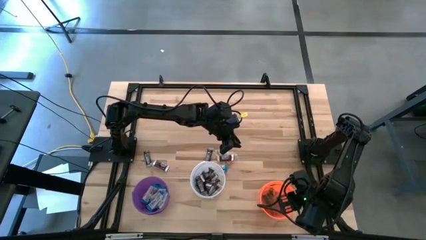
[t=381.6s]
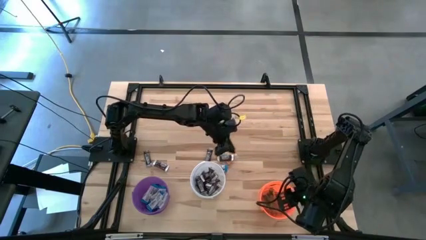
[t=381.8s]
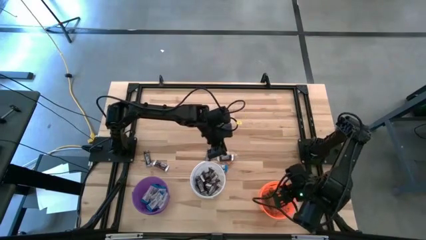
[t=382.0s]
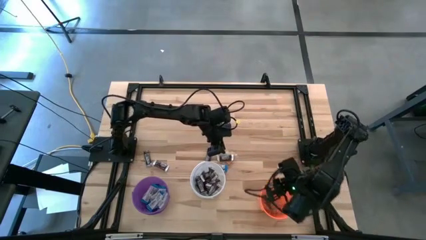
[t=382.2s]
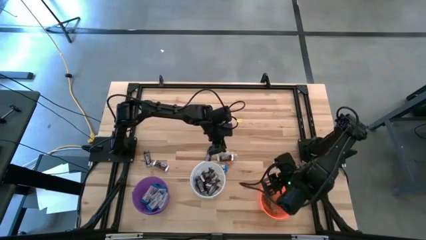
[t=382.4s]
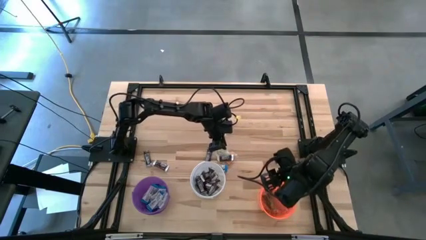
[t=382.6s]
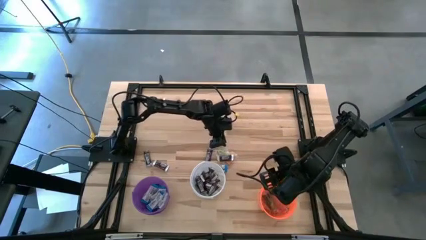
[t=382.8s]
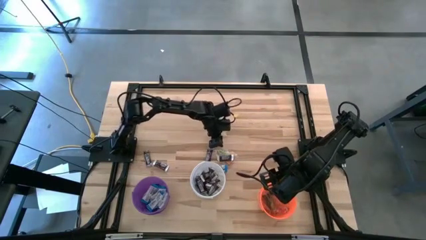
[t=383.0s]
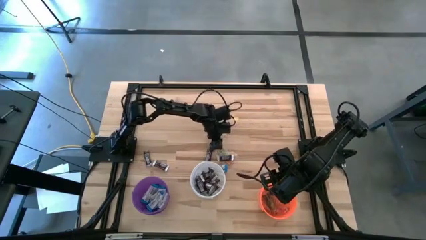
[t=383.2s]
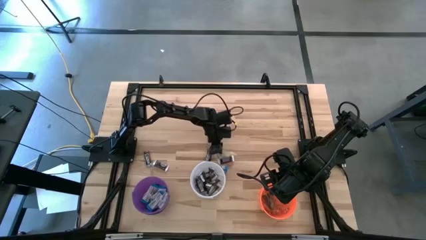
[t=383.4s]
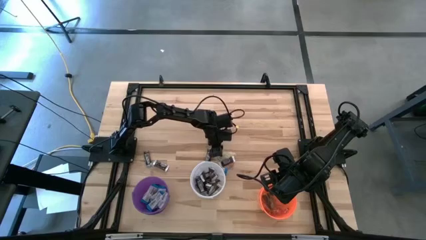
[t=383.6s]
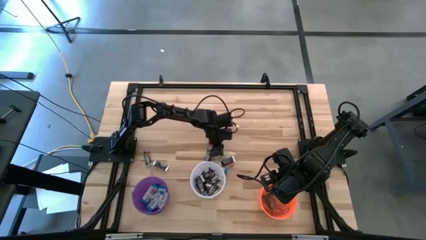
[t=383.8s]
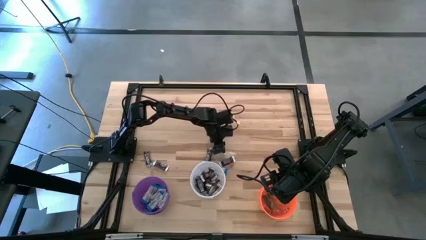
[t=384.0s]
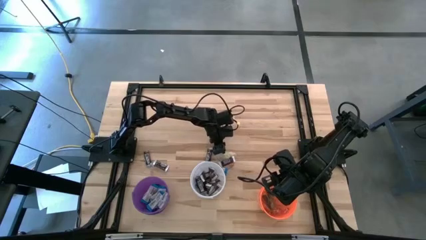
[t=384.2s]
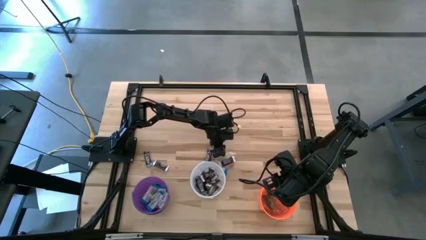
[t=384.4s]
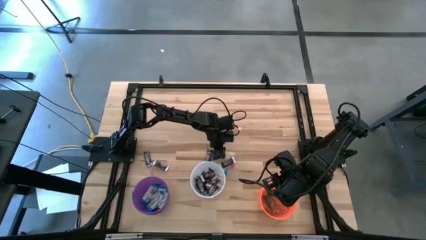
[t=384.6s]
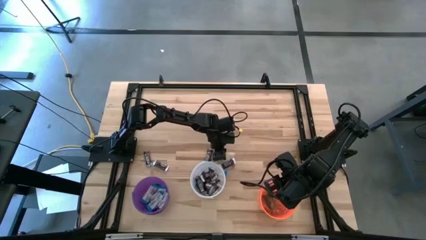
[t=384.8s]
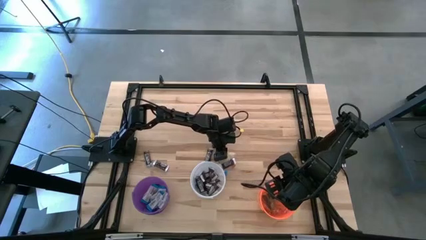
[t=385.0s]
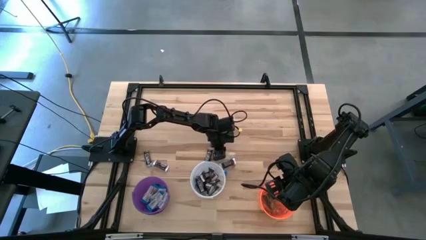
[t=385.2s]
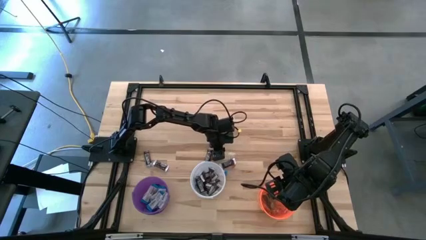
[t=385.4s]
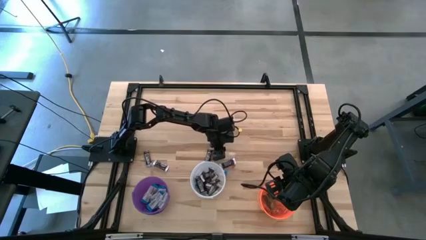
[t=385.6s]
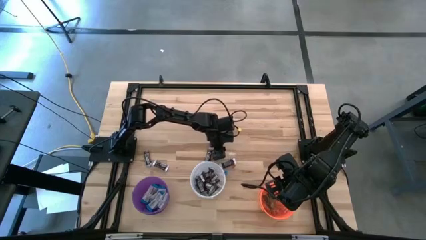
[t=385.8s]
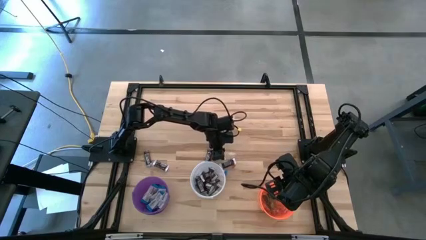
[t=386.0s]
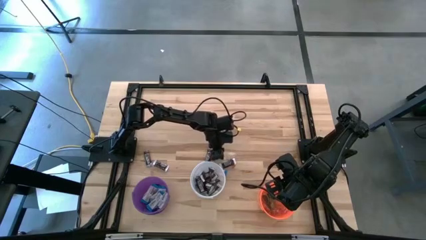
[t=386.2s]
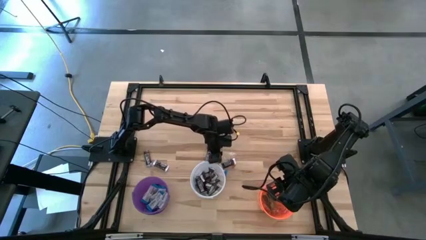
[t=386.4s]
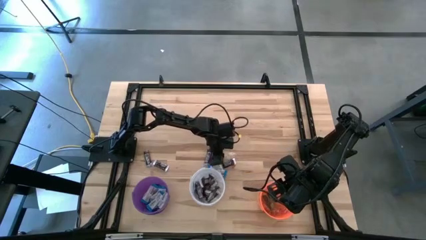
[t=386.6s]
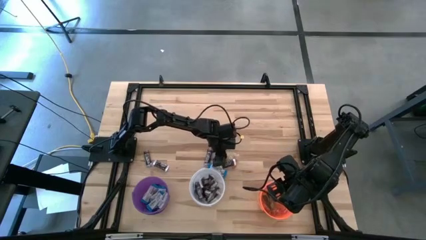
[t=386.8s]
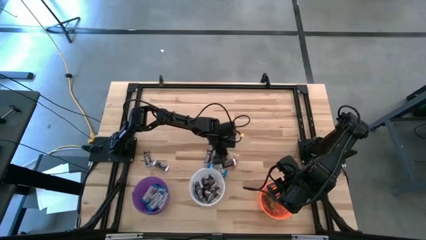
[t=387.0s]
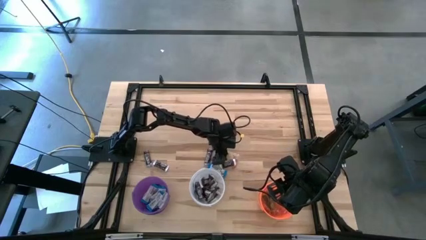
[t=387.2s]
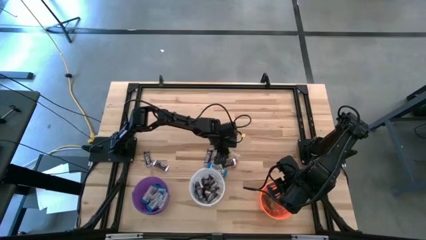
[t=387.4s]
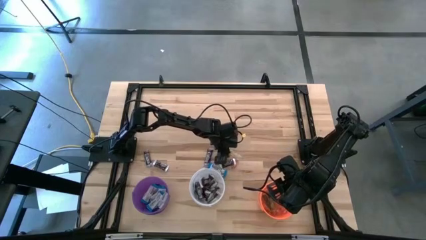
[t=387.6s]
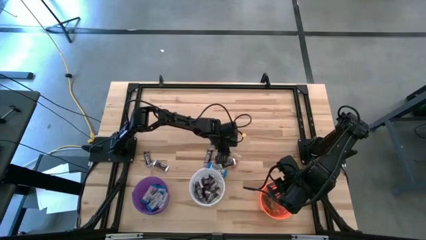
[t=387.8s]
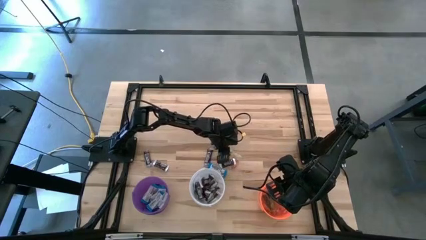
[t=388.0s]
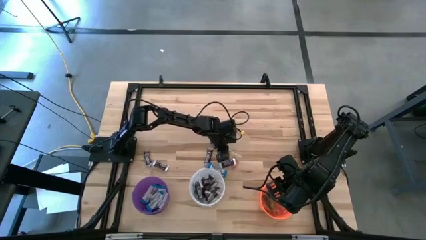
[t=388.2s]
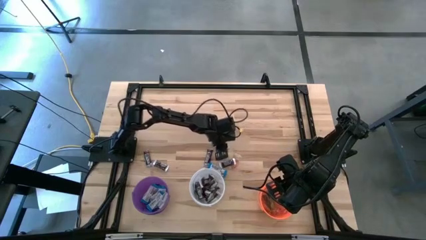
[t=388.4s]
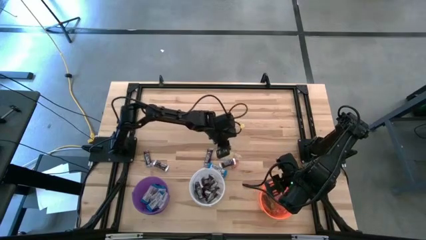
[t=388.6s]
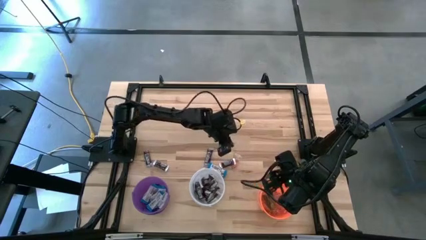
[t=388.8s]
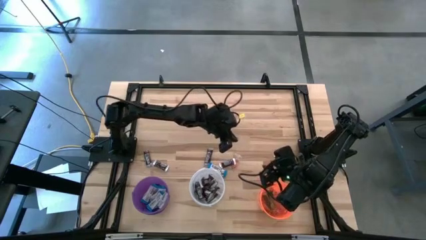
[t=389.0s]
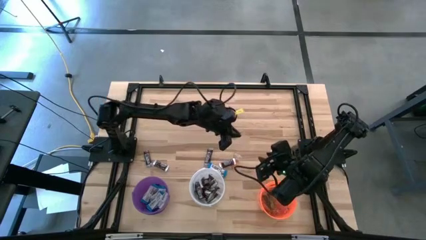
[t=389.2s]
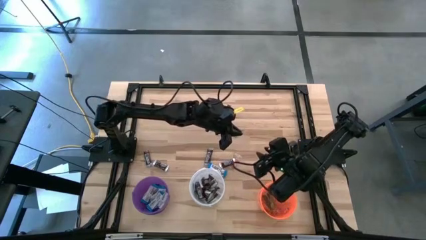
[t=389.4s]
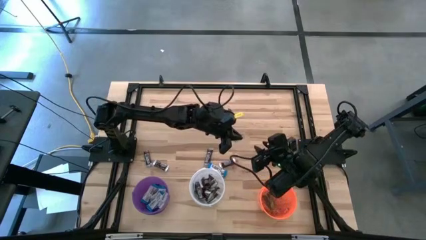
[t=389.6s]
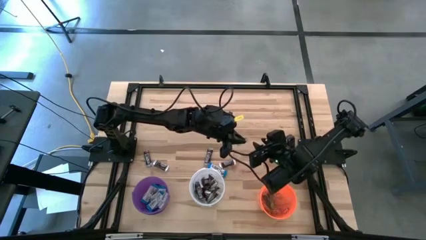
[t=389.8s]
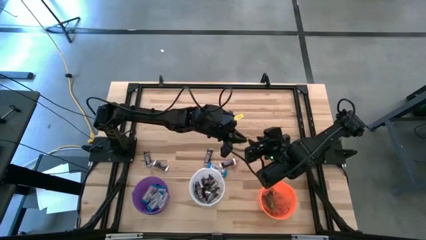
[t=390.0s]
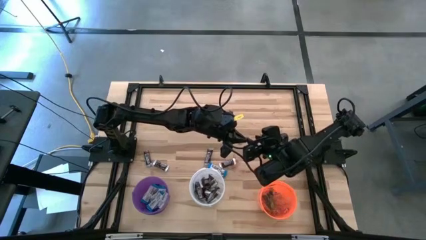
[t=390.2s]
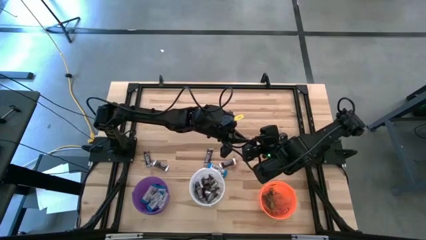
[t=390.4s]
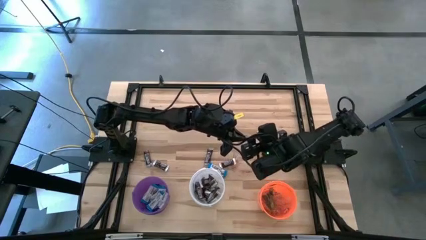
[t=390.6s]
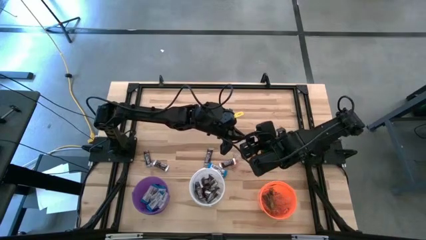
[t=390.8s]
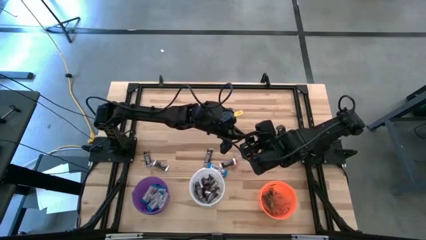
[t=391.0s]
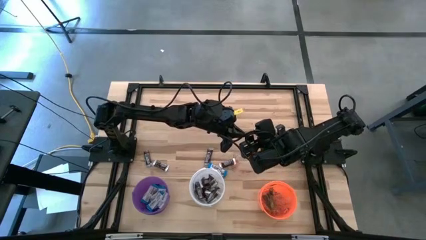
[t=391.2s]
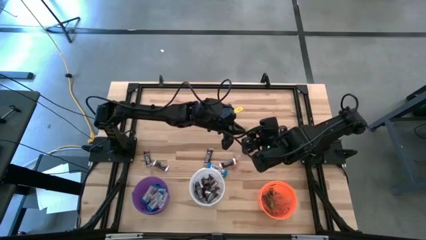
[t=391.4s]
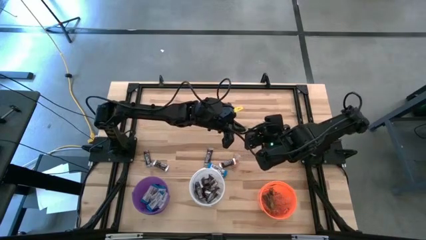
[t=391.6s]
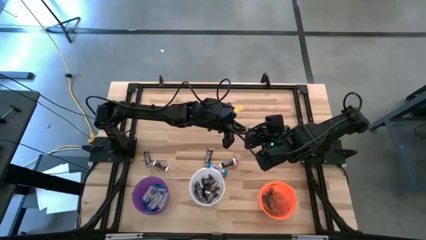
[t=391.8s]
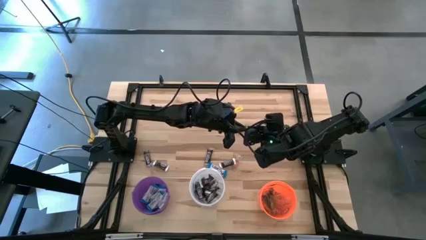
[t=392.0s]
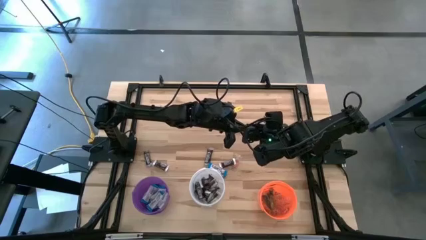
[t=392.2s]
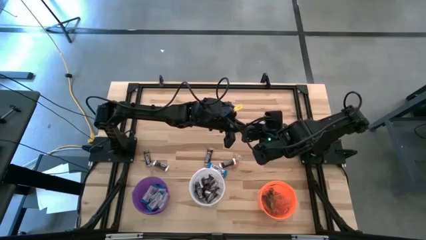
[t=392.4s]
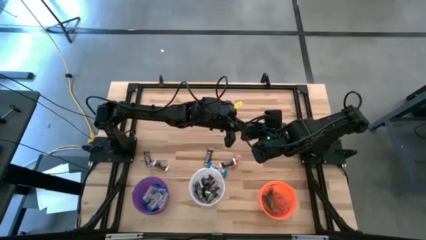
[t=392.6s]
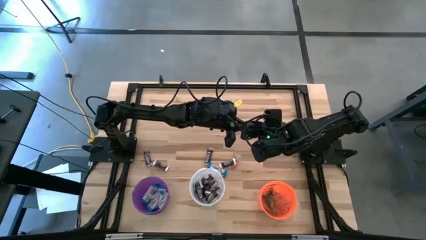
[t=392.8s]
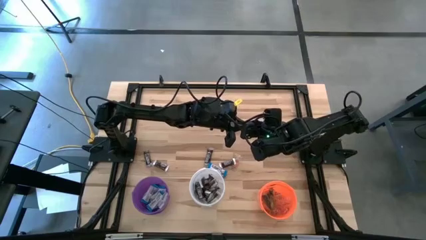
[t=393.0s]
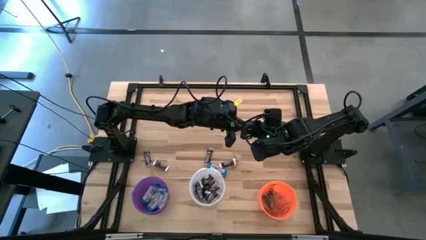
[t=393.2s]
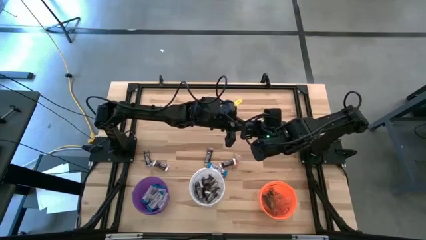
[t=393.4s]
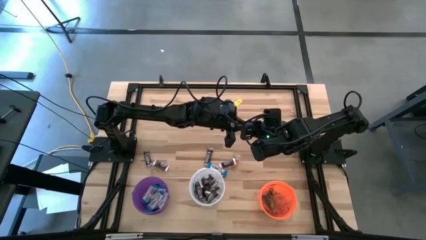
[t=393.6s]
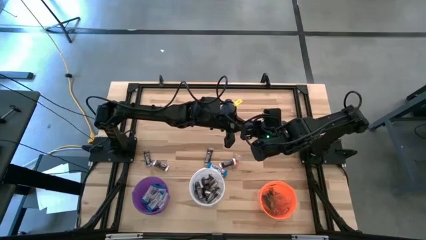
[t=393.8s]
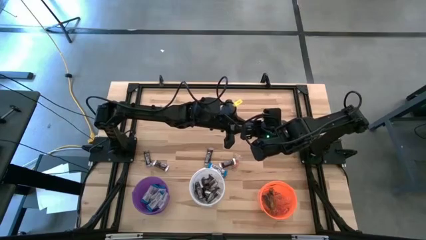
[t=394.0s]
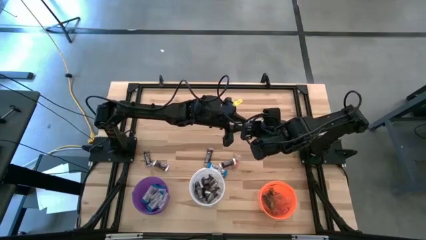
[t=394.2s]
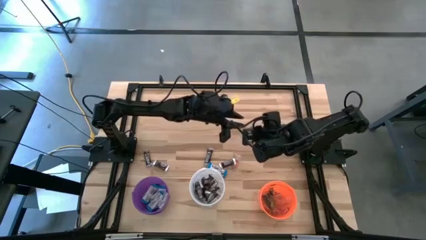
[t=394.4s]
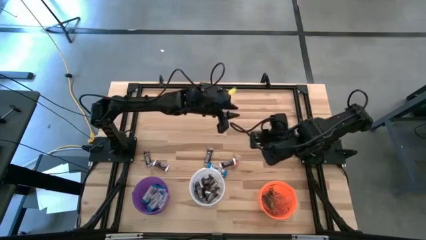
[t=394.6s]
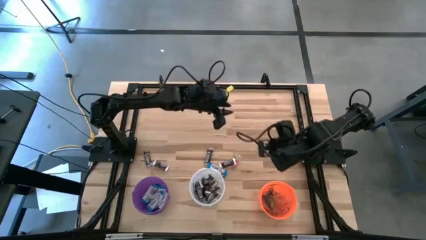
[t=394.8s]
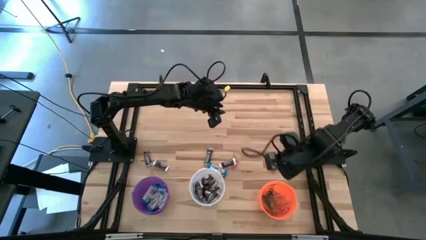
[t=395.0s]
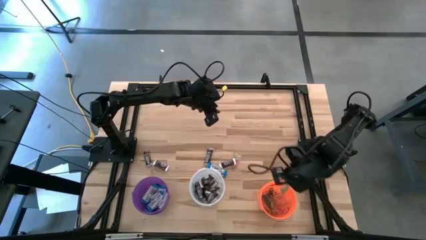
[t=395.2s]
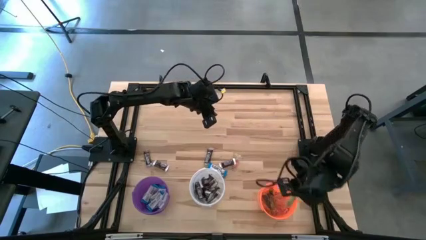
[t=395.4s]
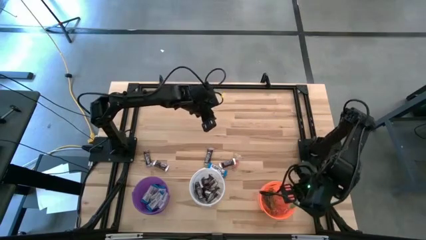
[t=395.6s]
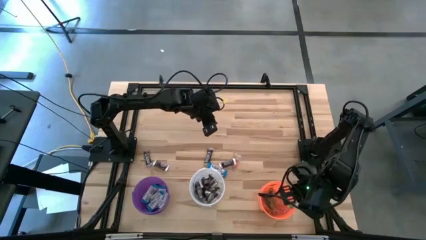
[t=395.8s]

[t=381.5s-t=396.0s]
Task: Sort candy
Put the green gummy into the orange bucket
